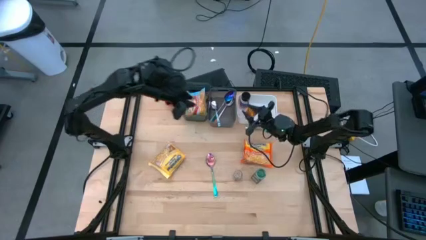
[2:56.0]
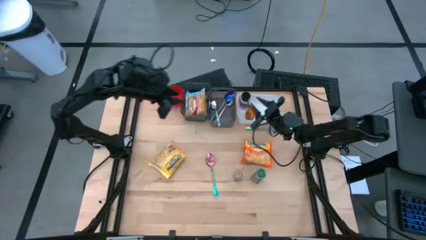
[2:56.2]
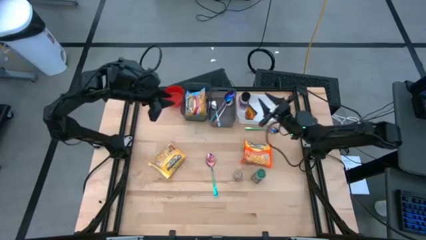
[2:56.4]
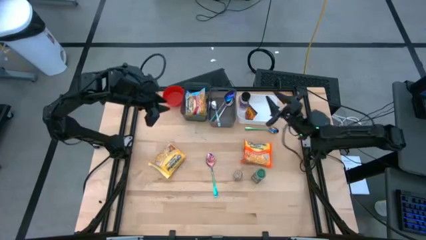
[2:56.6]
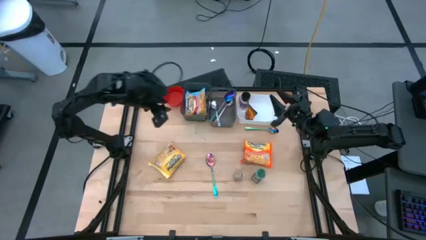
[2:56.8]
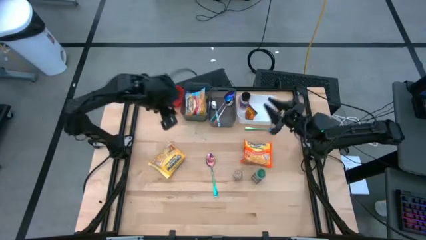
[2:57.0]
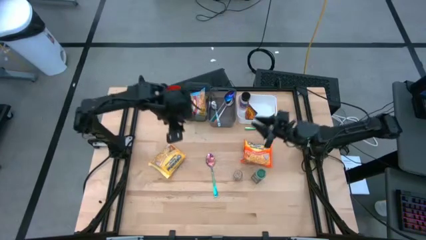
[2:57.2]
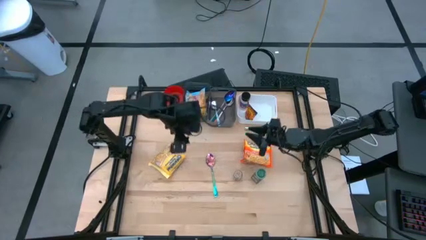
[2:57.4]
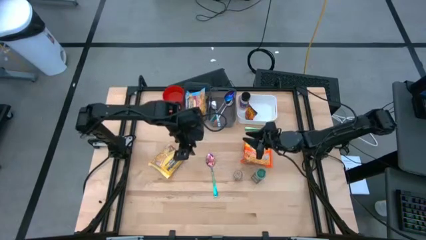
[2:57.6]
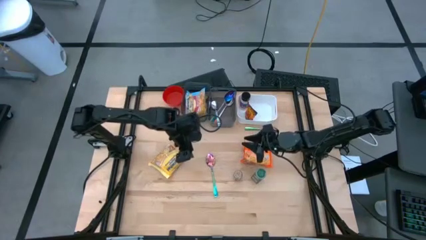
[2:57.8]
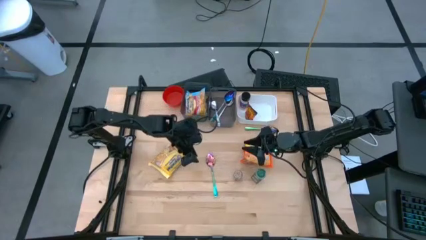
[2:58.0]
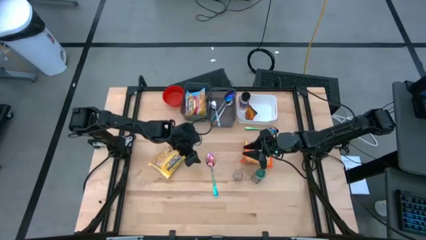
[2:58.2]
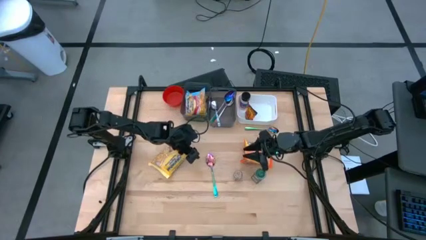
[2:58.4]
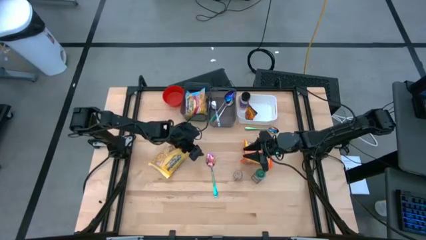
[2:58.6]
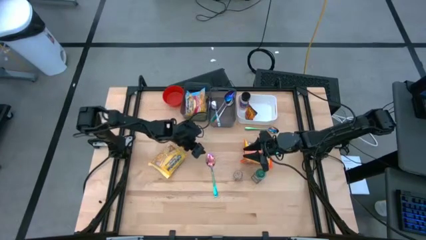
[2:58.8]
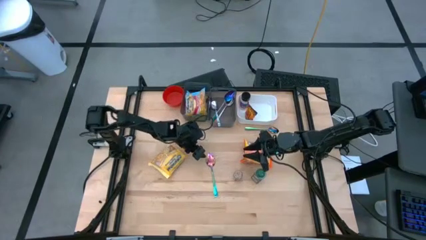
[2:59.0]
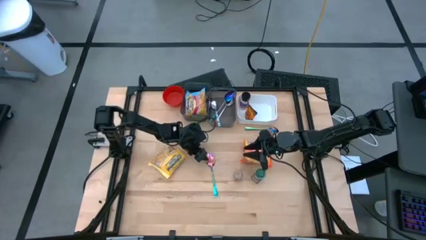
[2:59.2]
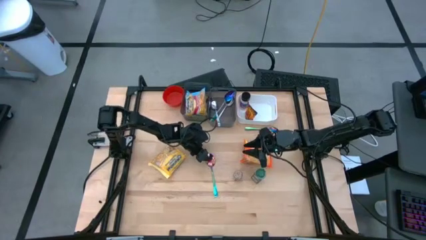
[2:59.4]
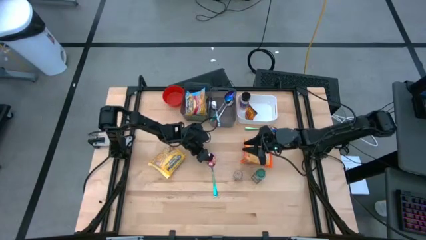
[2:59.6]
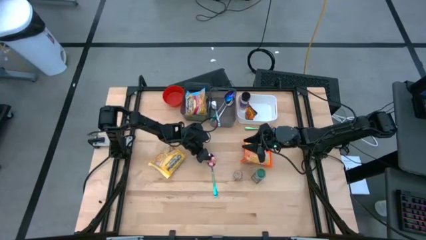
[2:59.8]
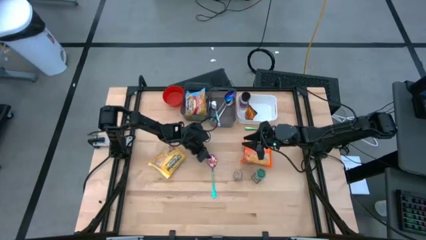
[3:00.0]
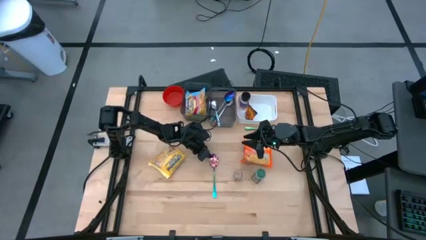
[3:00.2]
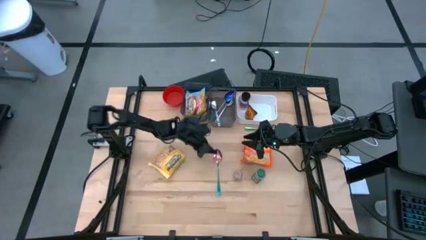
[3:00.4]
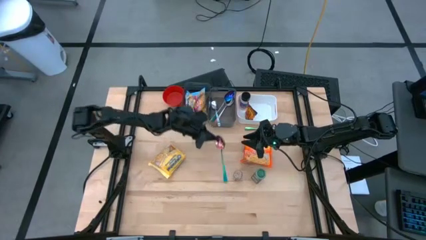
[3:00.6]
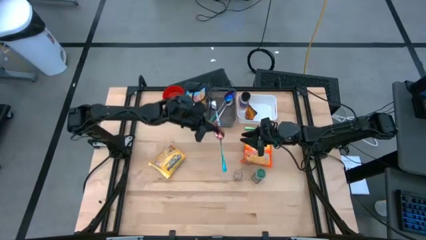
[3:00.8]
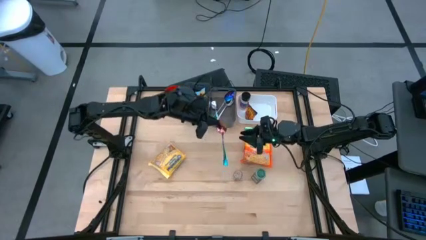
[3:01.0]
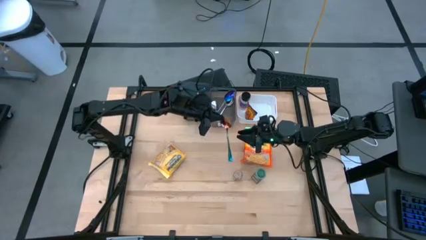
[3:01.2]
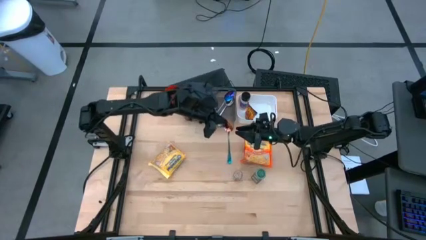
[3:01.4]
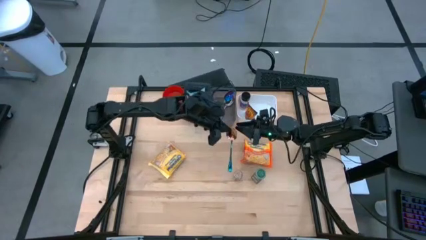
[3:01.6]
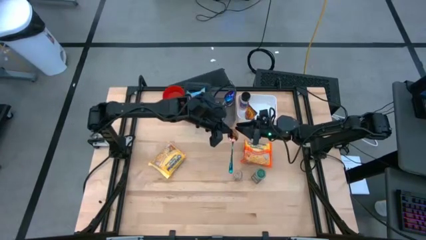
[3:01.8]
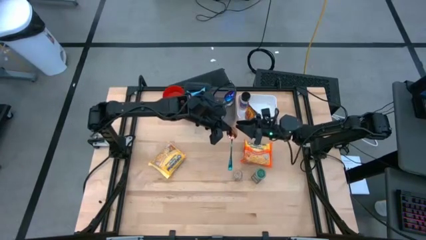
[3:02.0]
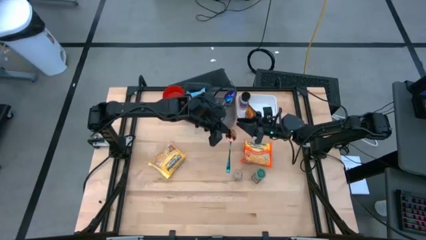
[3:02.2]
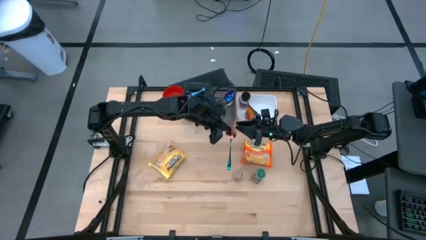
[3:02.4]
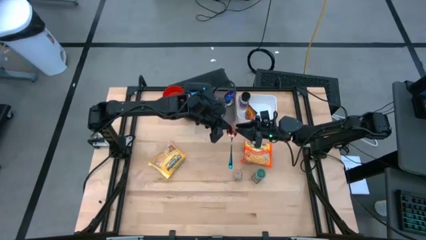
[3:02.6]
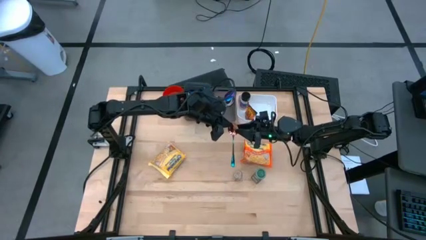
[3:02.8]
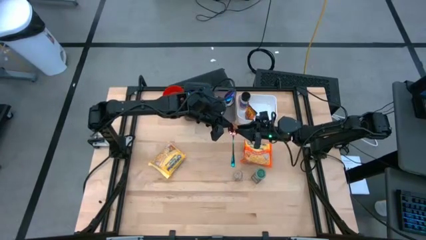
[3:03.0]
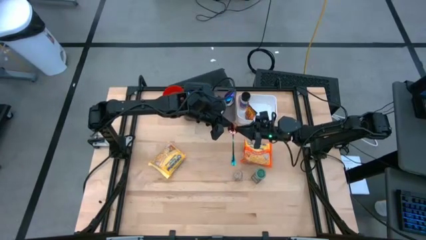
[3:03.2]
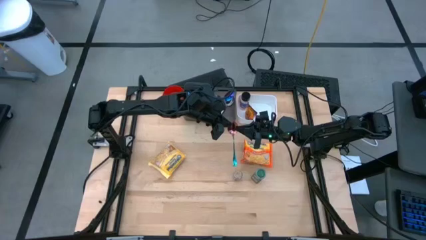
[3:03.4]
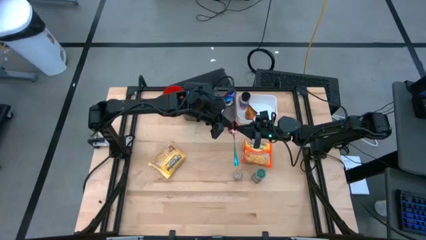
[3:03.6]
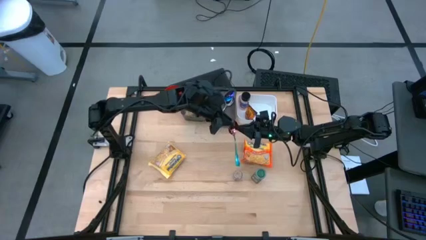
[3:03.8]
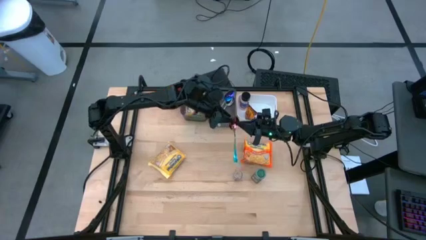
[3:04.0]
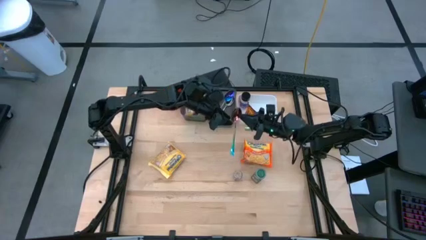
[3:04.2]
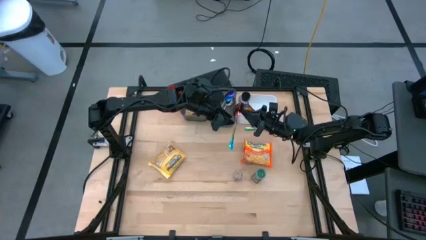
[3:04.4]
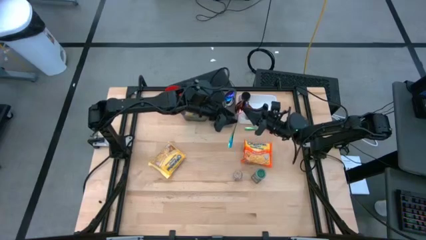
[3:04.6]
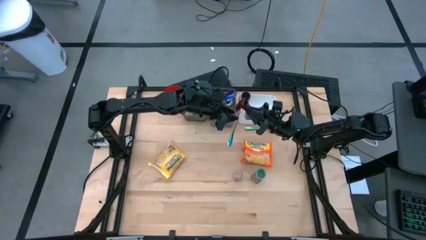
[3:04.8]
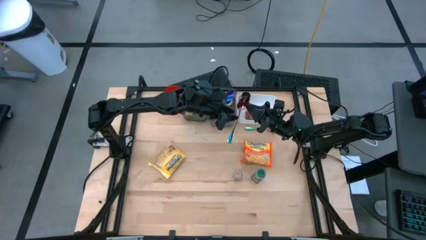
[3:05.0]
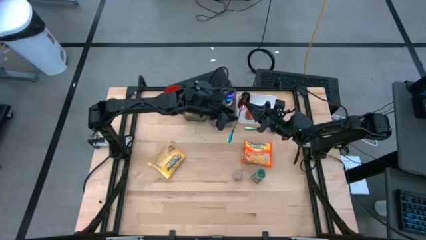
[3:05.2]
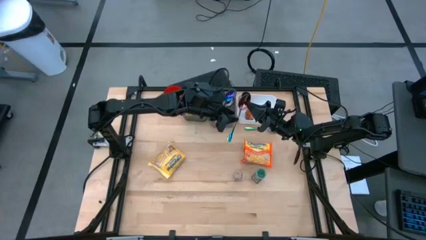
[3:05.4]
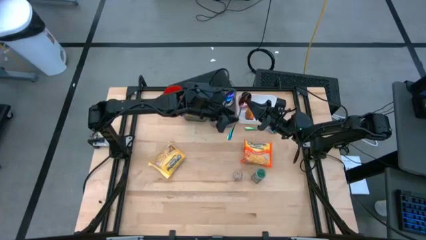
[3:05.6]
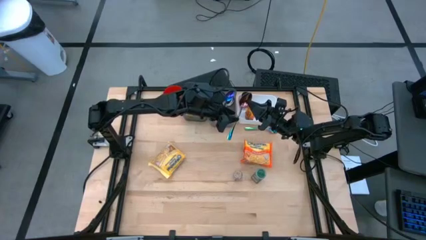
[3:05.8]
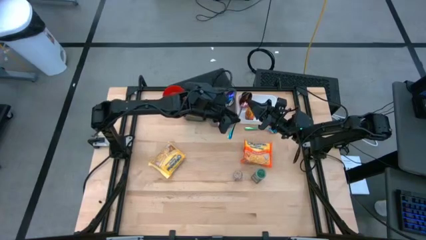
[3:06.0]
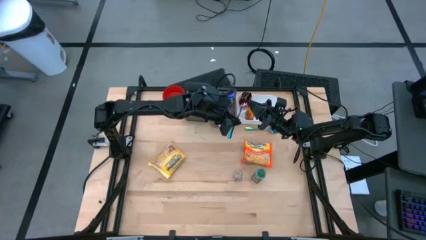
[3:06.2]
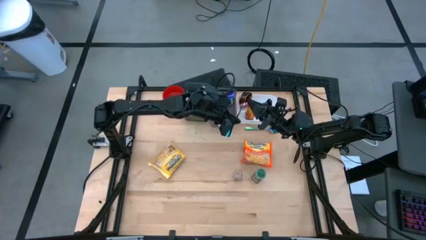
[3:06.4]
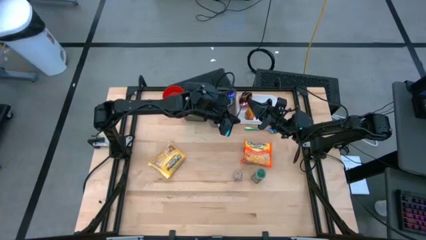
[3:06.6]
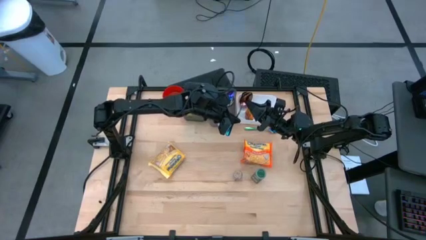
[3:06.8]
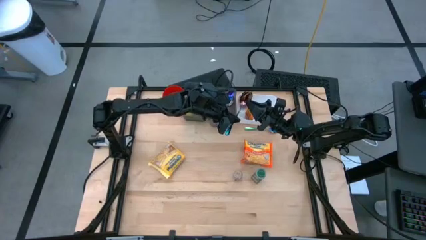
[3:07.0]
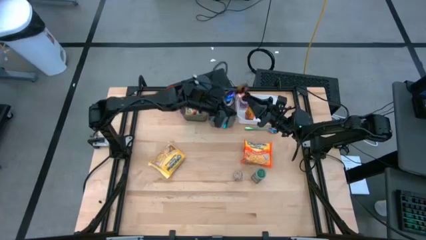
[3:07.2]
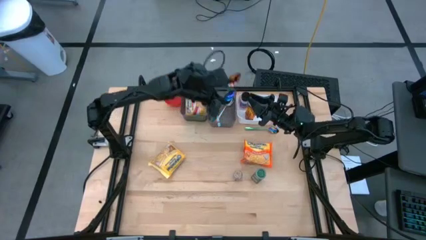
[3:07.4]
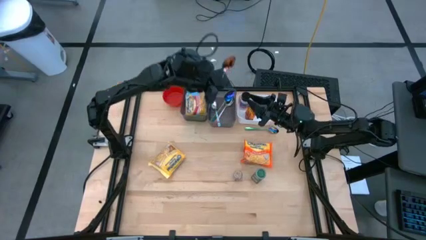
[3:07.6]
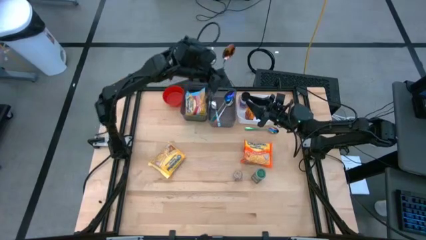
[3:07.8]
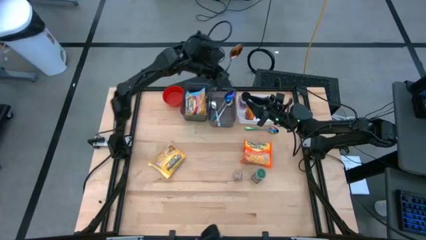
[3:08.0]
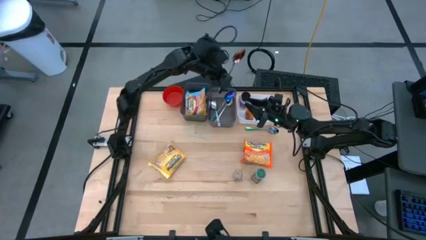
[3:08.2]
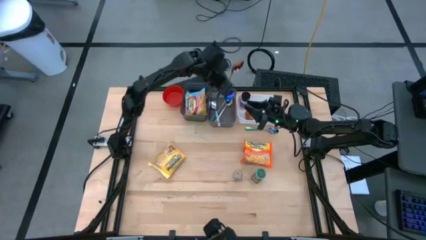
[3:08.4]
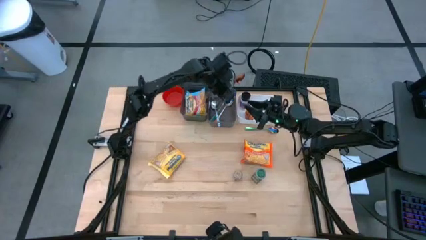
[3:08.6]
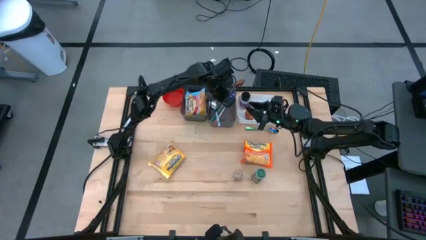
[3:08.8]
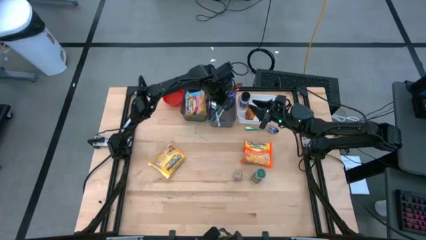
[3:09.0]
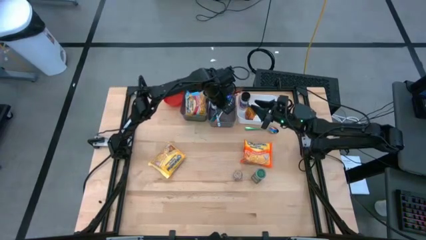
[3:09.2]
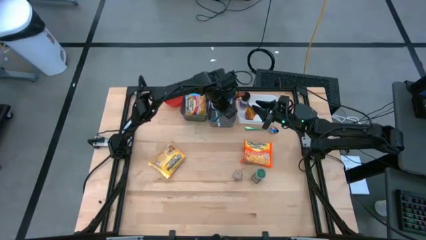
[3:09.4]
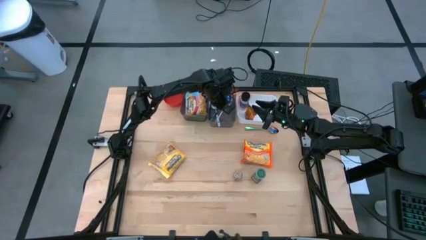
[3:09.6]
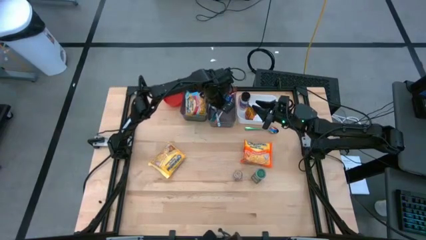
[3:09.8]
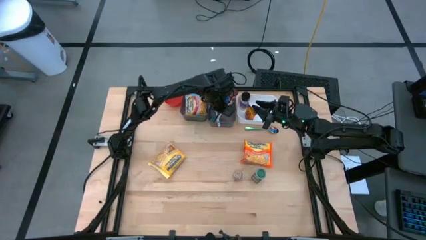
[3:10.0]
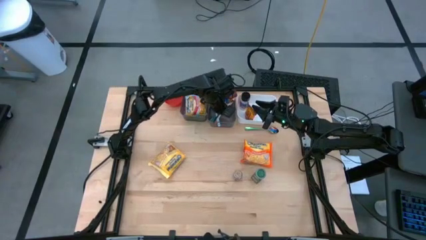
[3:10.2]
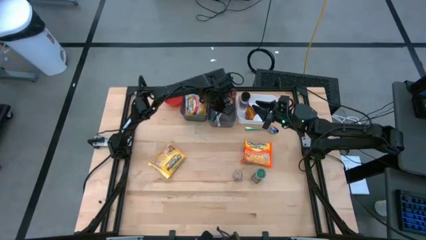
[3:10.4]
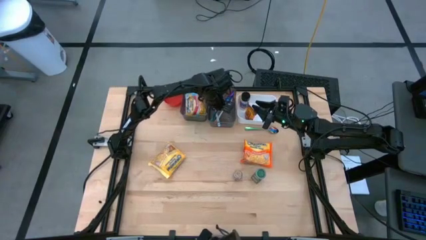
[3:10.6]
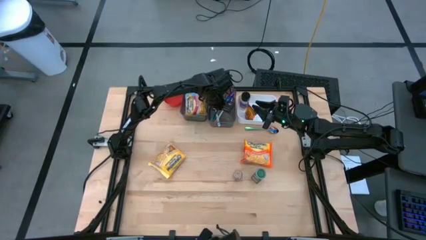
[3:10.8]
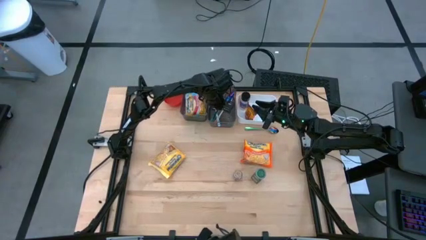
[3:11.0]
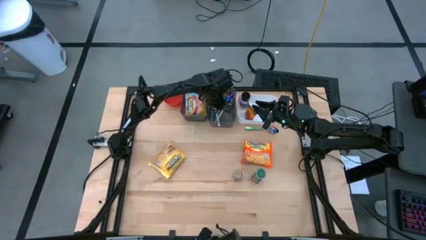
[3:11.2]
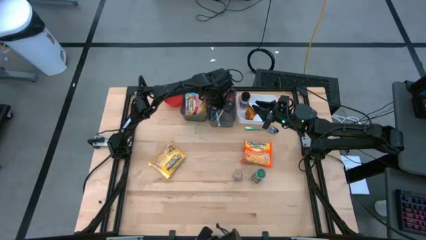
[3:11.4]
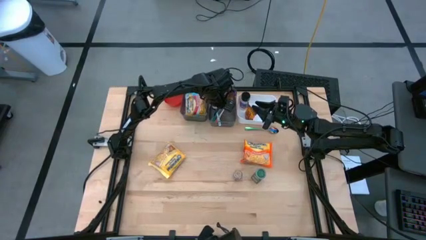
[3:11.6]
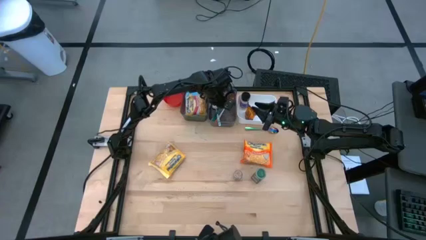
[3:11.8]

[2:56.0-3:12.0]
Task: Pick & Place Food Item
Put the bottom violet spoon into the right black bin

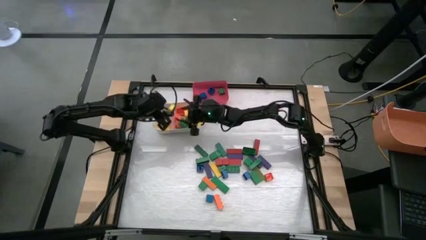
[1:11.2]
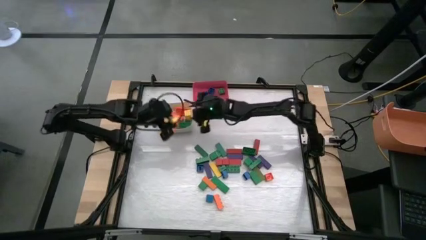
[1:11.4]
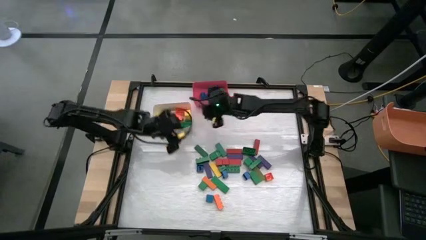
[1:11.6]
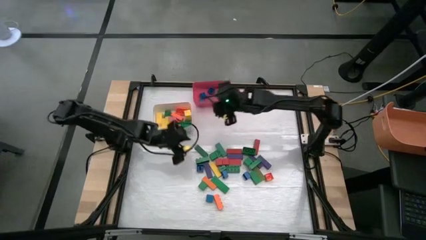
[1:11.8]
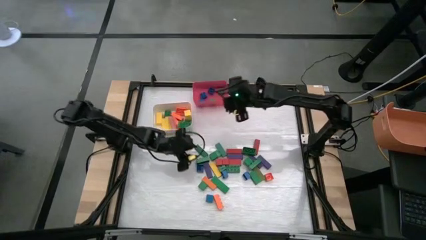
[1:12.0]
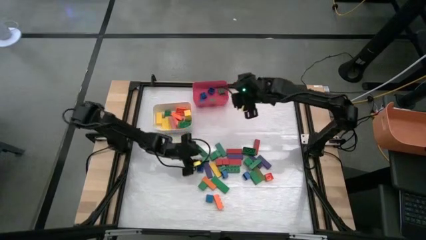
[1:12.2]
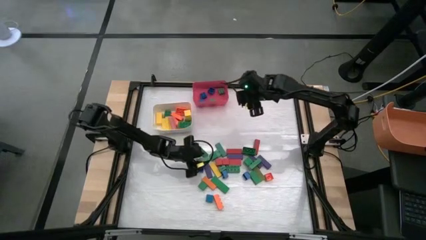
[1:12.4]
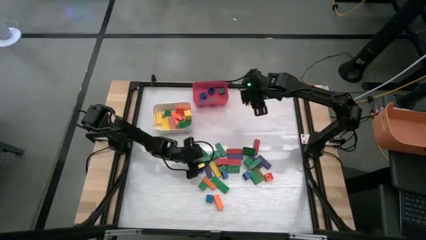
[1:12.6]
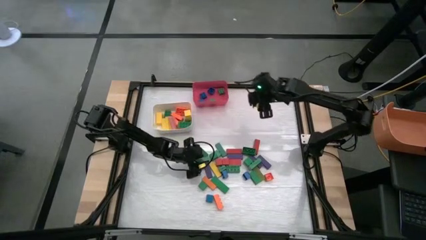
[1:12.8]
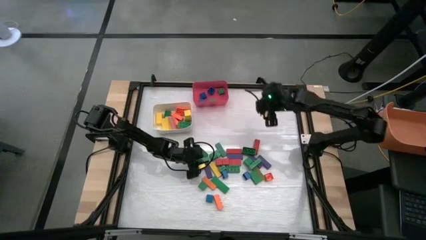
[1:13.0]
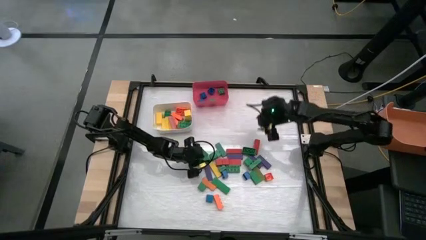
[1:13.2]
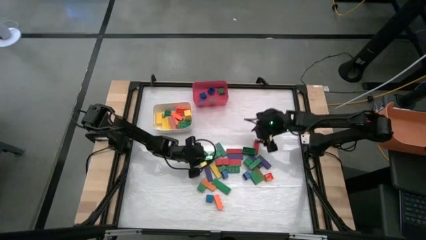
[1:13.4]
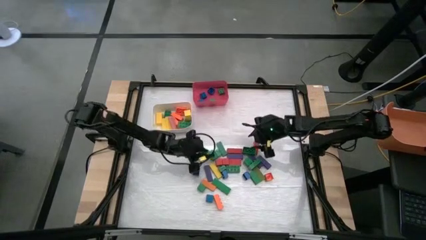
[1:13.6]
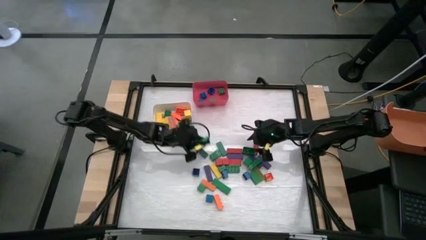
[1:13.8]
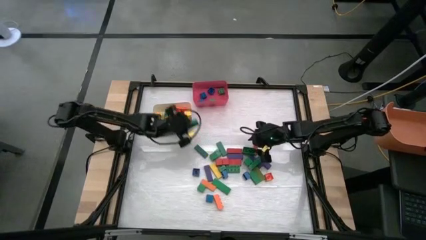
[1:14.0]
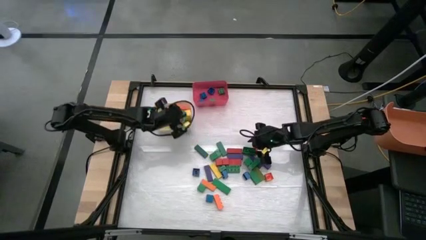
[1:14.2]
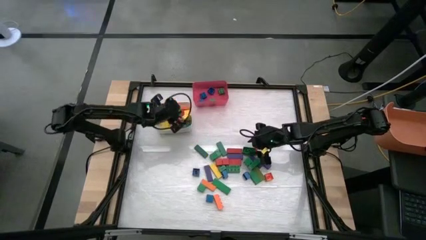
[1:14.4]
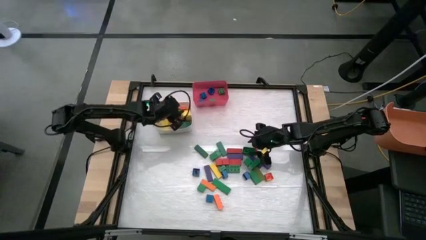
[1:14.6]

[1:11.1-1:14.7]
Task: Sort blocks by size
Put the large green game piece into the white bin
